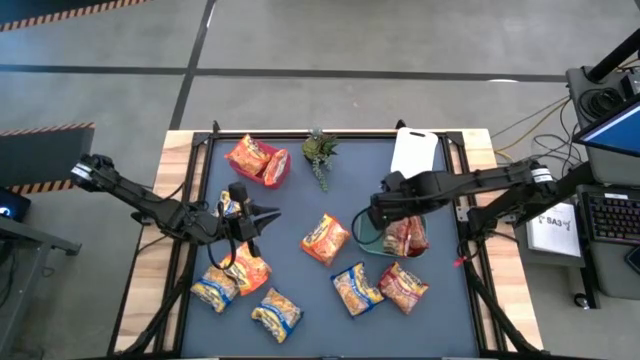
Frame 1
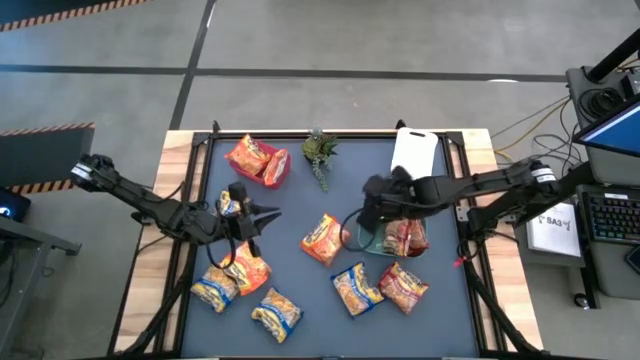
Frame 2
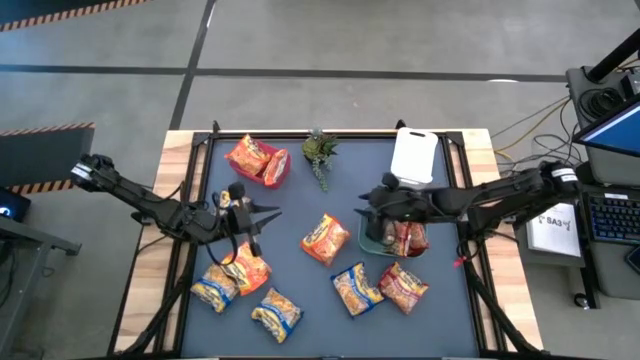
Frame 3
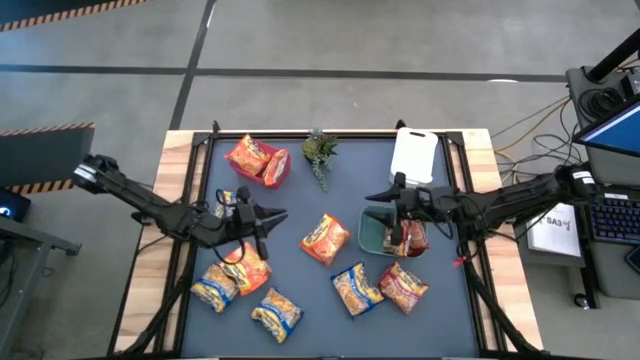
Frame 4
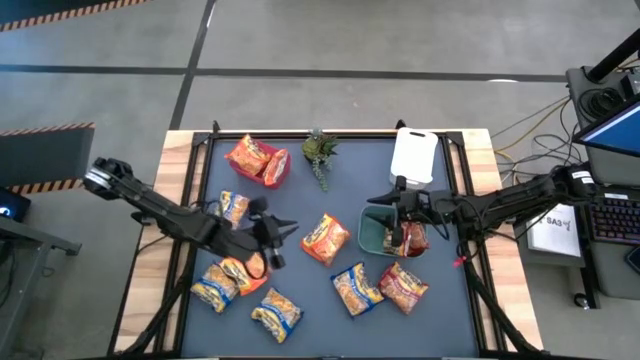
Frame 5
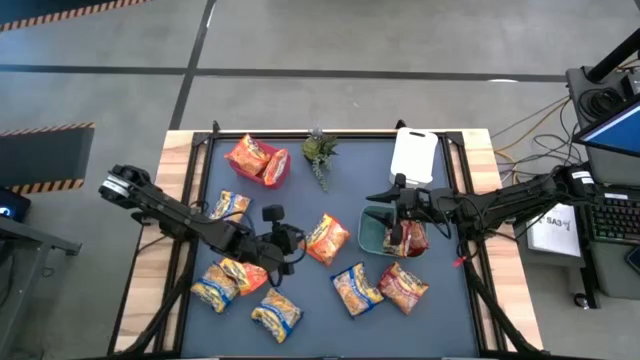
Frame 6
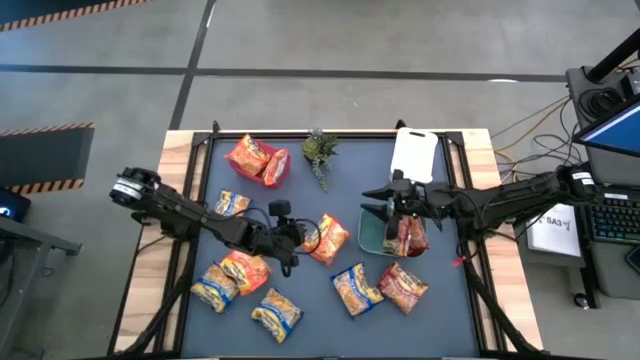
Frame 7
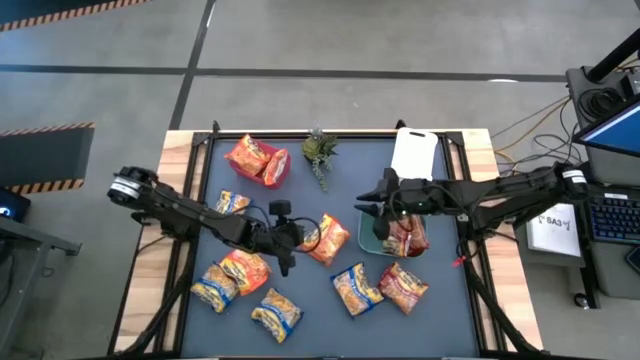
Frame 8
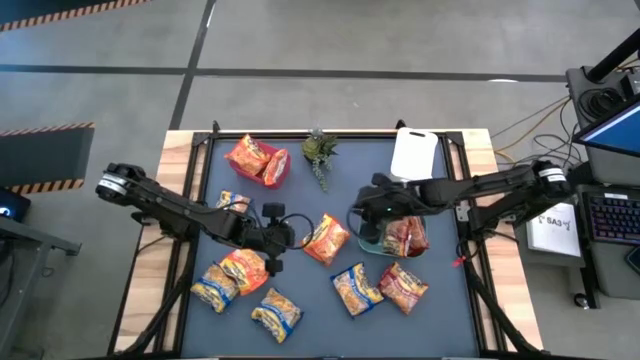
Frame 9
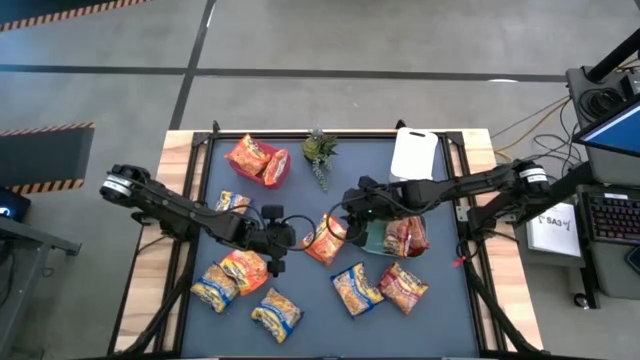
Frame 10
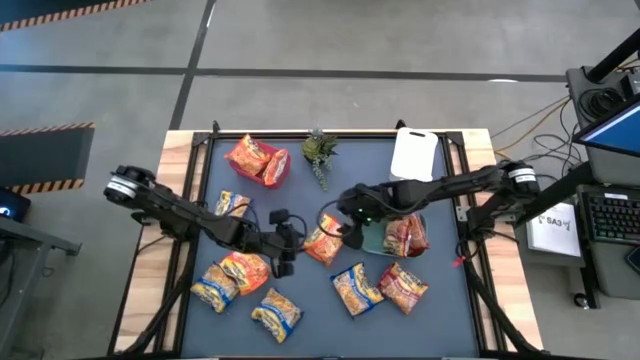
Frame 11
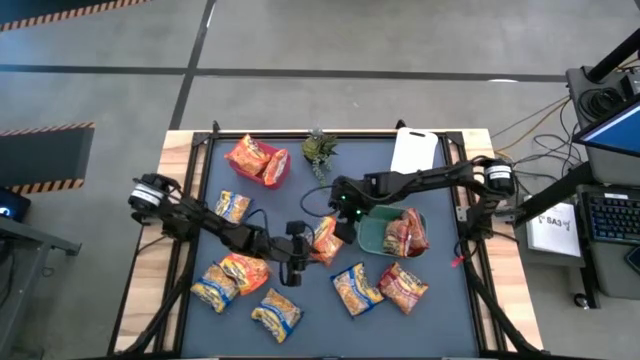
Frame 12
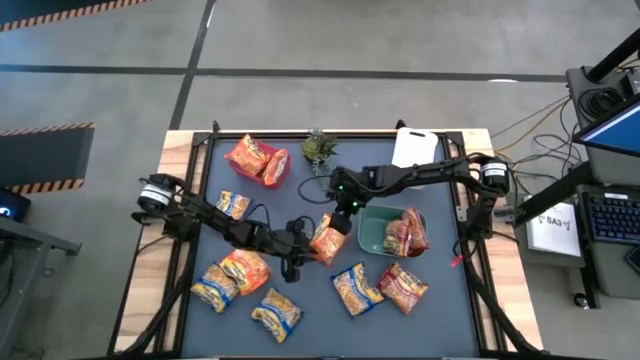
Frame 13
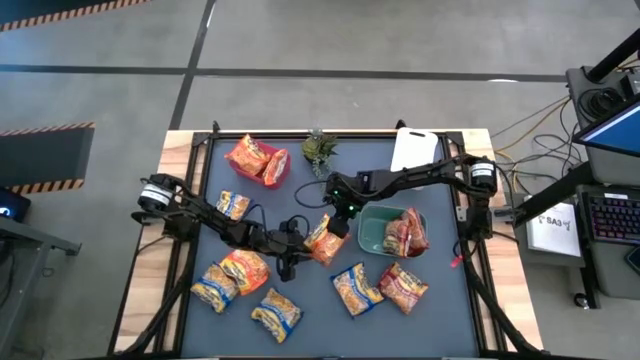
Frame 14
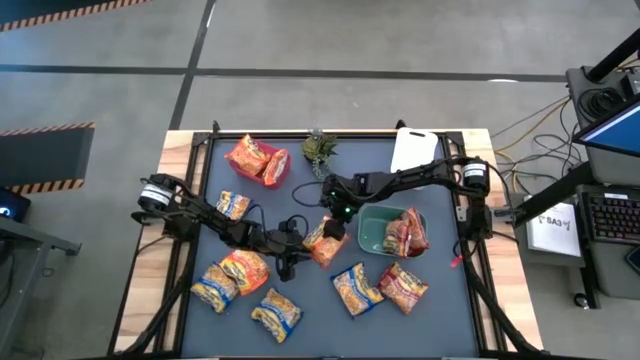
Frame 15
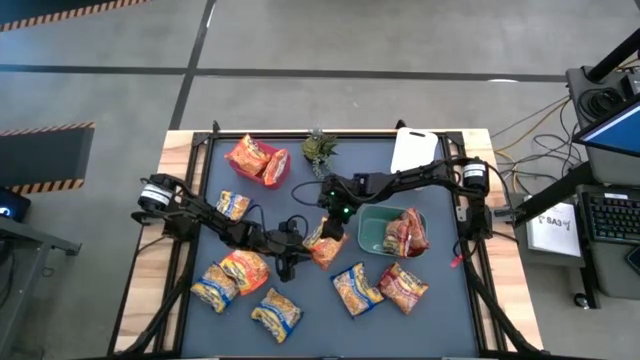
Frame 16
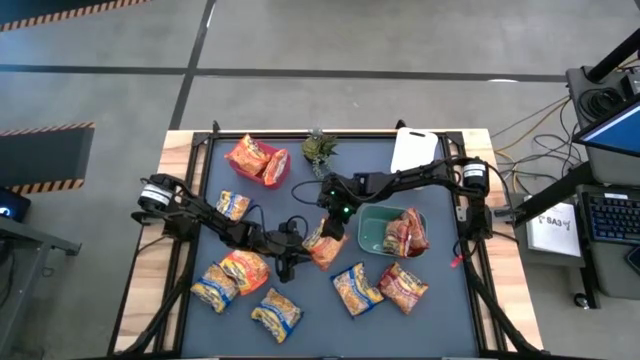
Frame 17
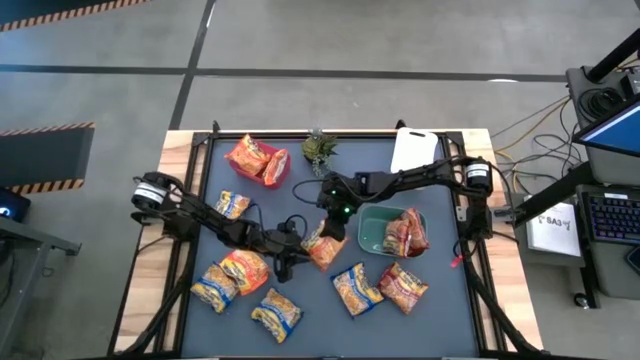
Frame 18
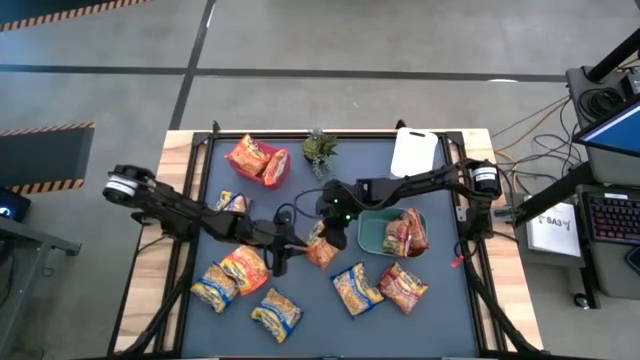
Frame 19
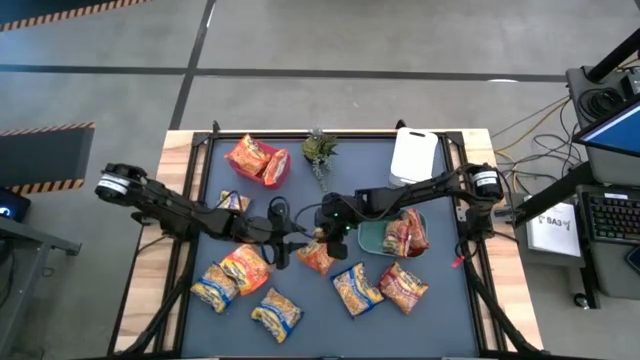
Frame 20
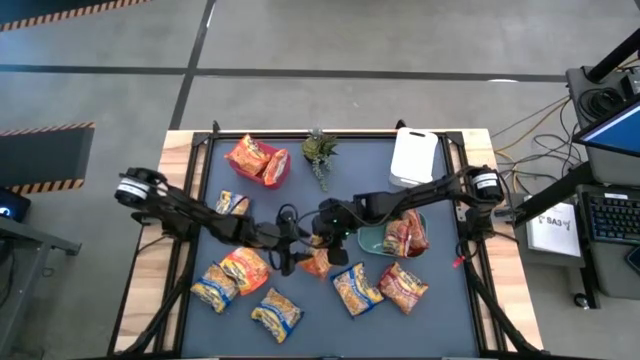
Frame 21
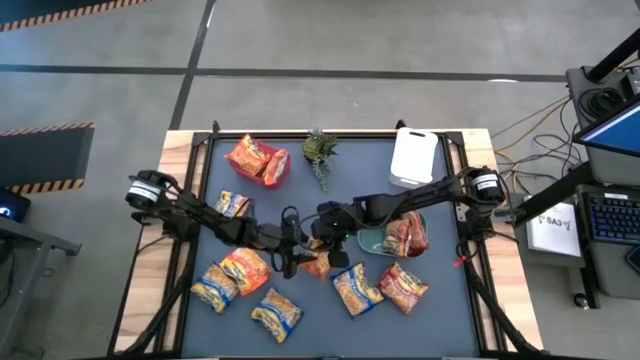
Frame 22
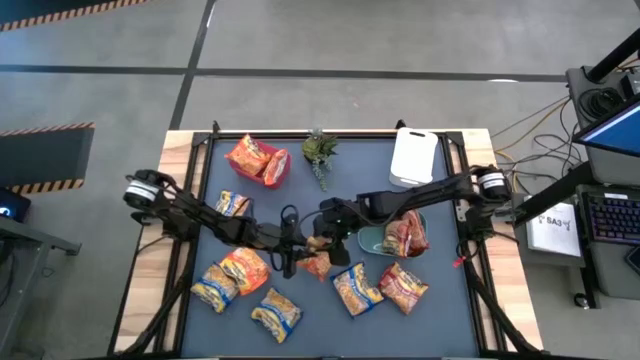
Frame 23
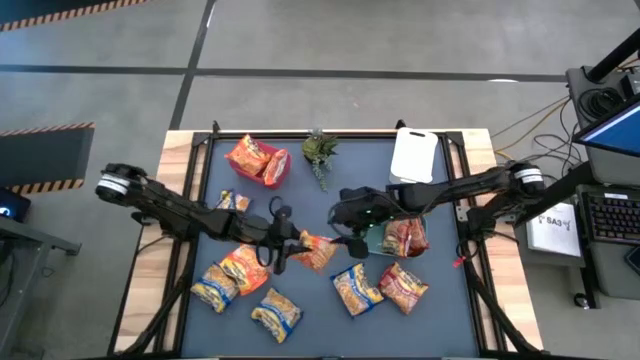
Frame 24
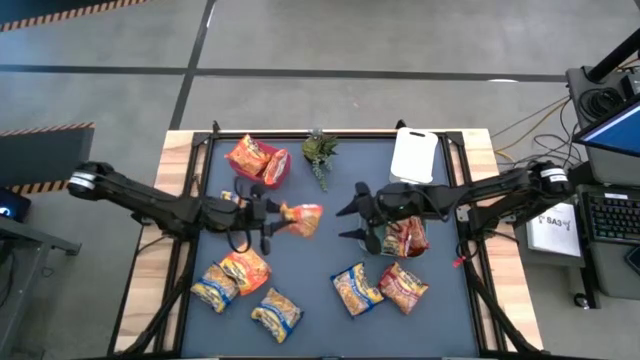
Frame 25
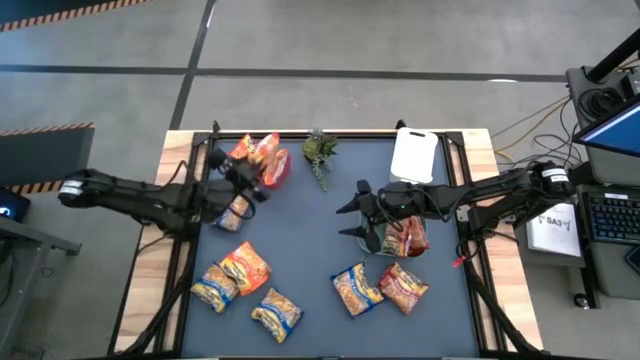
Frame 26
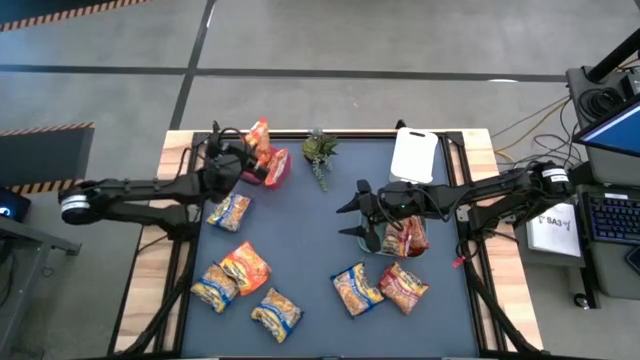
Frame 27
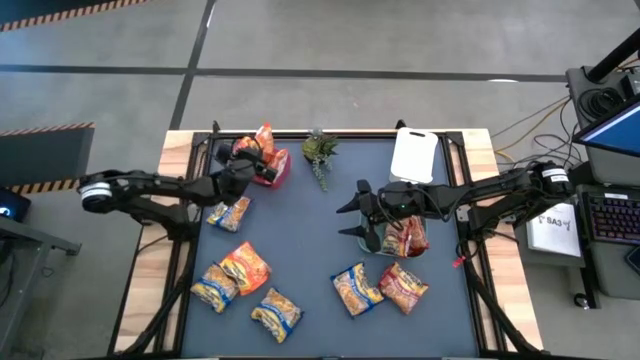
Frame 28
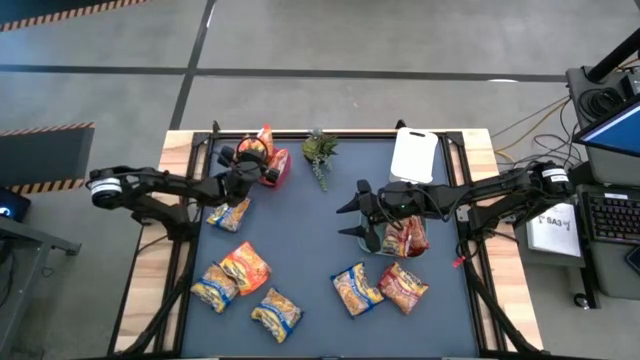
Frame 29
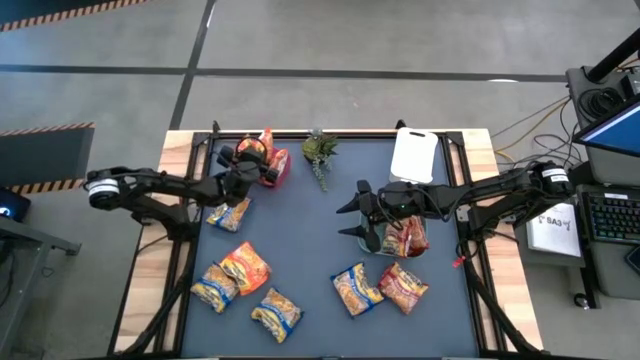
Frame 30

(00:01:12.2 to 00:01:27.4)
Task: Sort Maruchan noodles
Put the orange noodle pack into the red bin

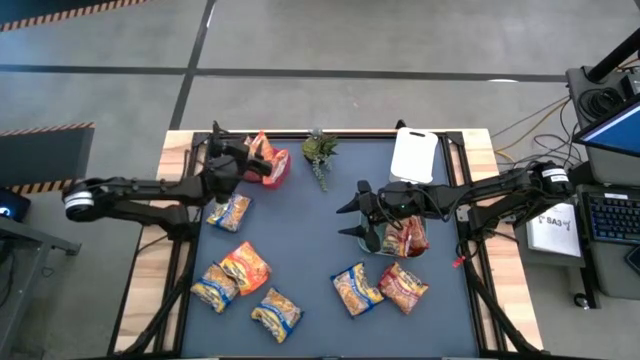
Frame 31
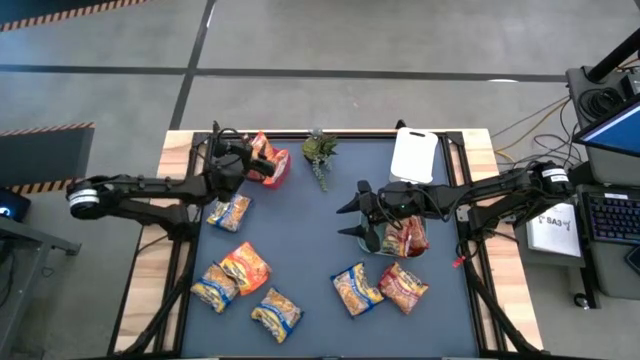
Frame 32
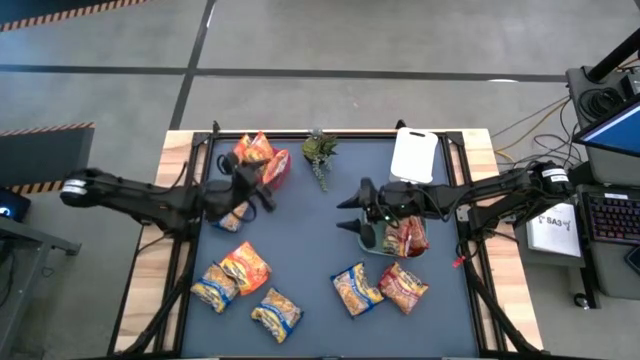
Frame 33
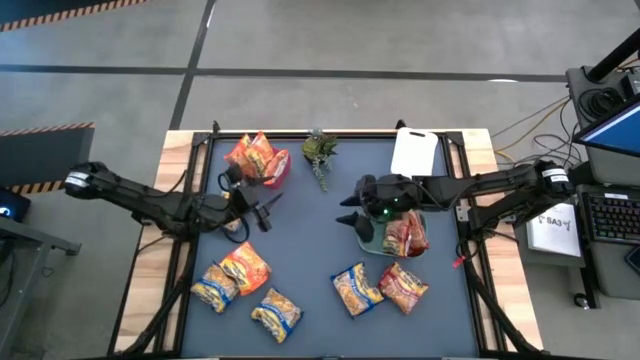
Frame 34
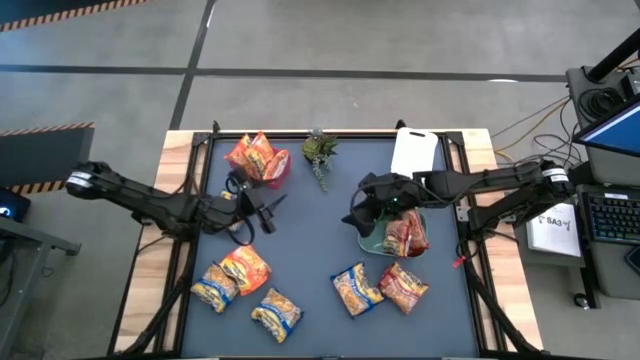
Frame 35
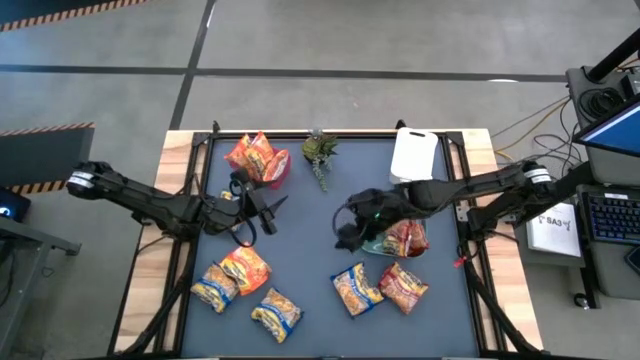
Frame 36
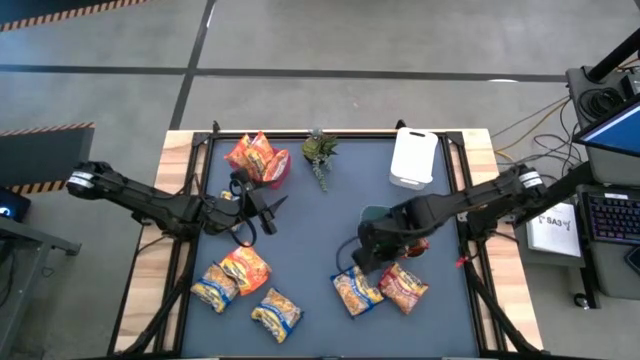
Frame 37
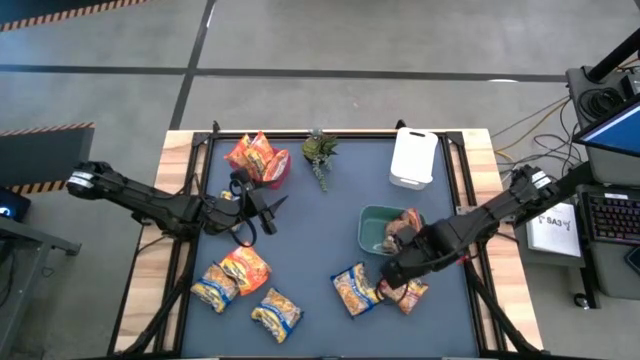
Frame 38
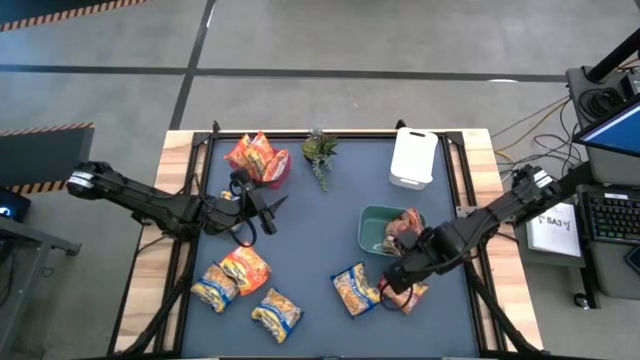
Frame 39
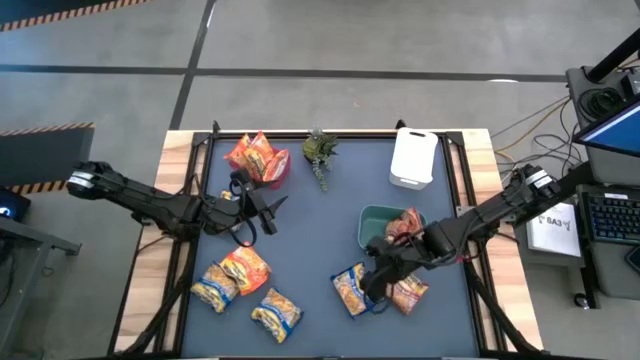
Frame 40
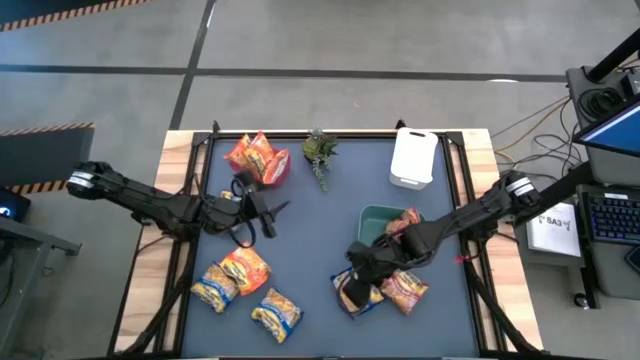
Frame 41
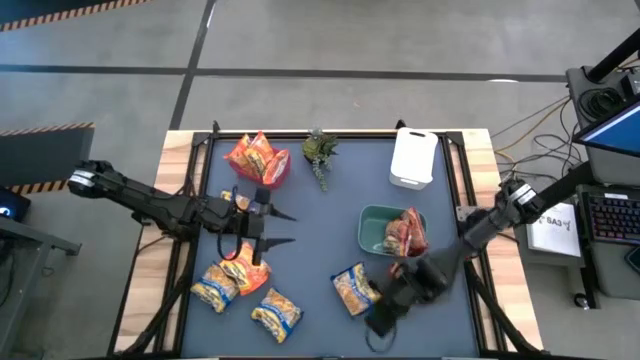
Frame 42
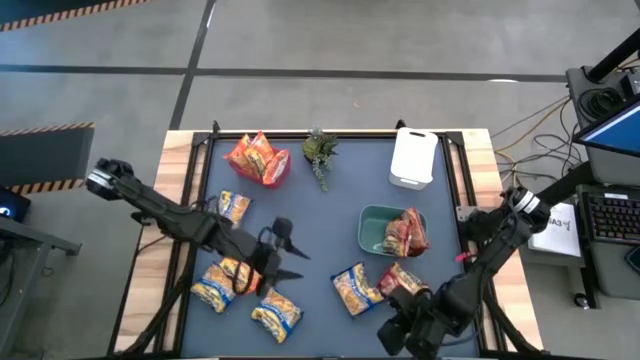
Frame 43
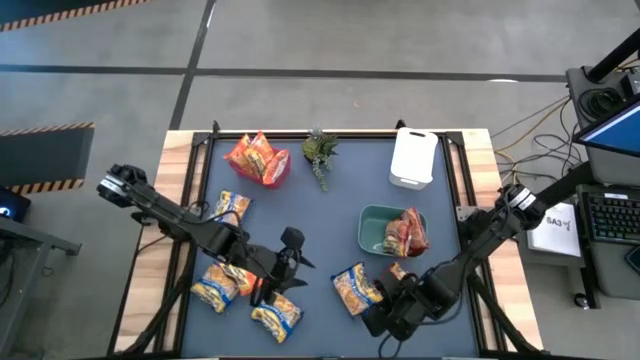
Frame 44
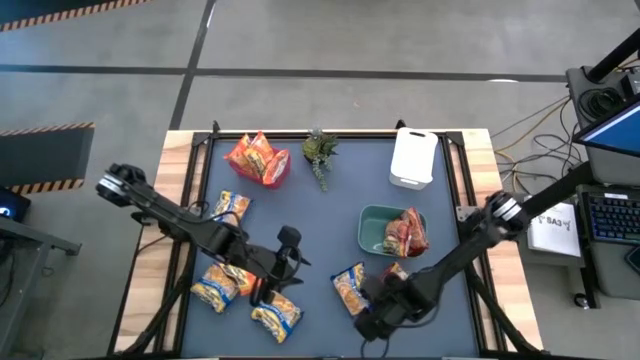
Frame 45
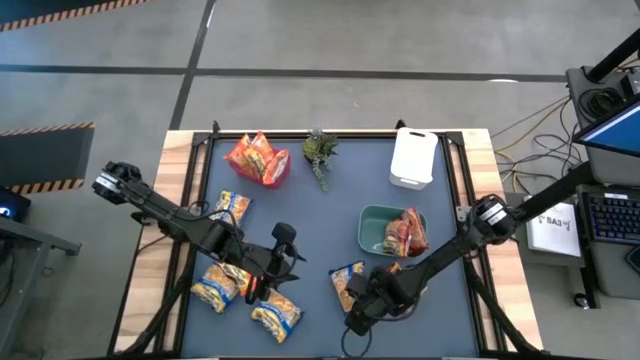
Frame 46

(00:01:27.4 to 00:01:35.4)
Put the blue noodle pack into the white bin
